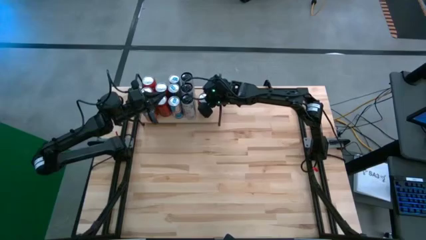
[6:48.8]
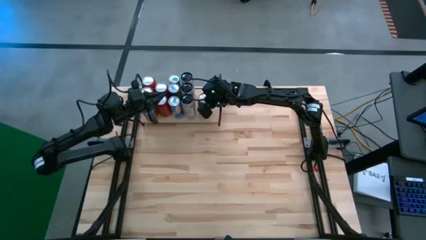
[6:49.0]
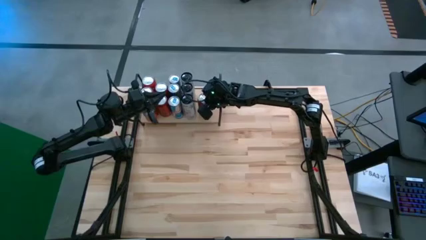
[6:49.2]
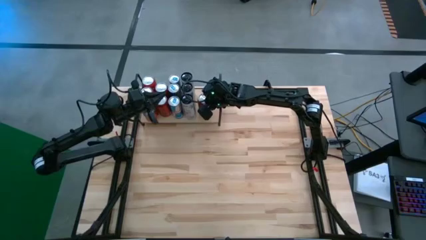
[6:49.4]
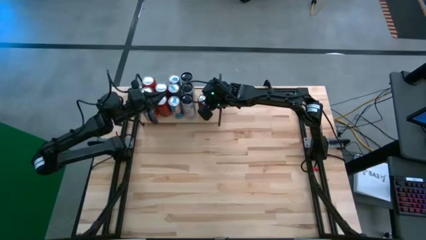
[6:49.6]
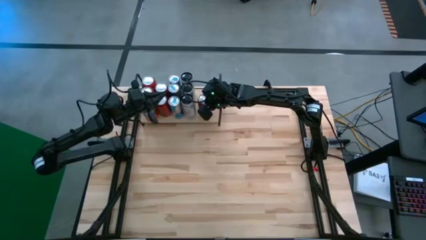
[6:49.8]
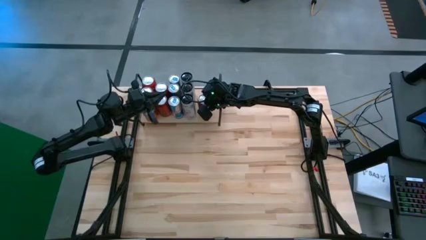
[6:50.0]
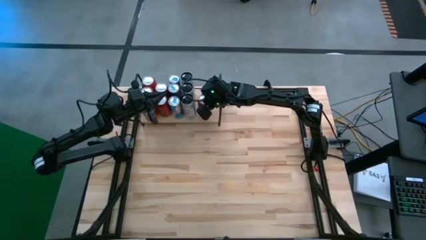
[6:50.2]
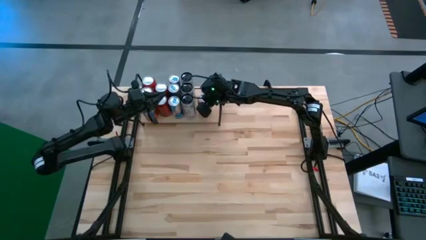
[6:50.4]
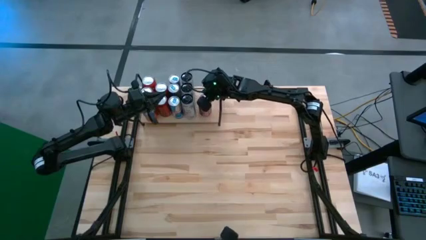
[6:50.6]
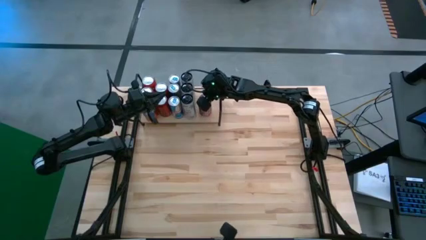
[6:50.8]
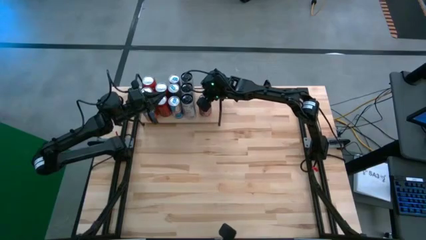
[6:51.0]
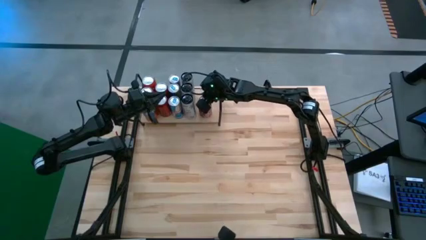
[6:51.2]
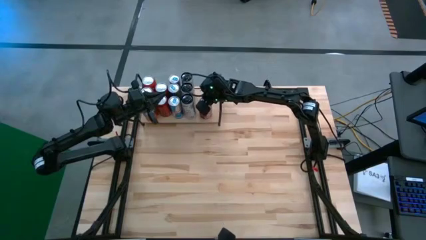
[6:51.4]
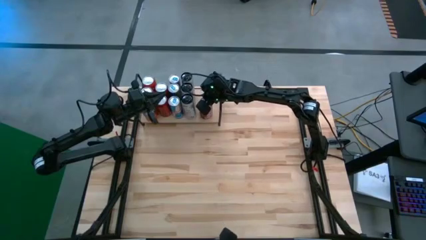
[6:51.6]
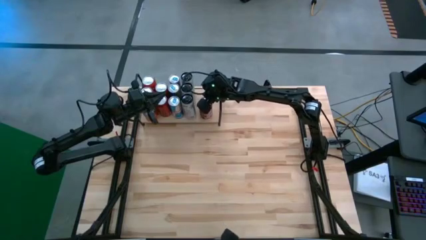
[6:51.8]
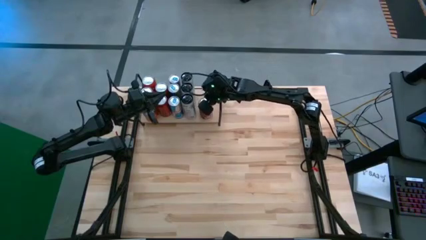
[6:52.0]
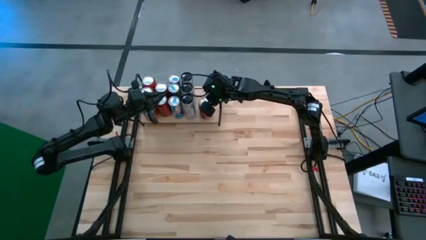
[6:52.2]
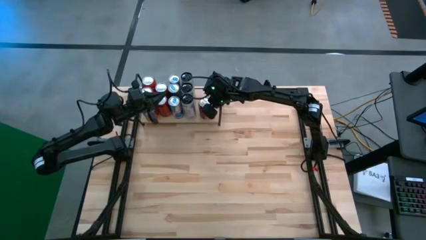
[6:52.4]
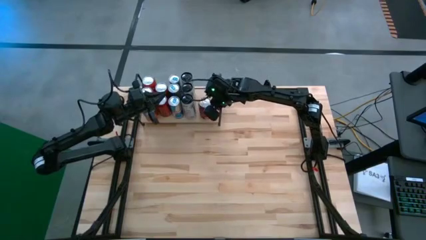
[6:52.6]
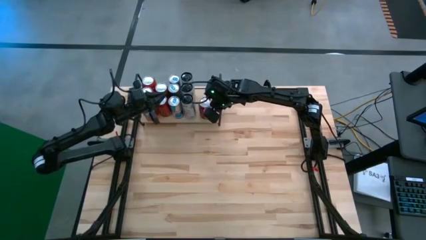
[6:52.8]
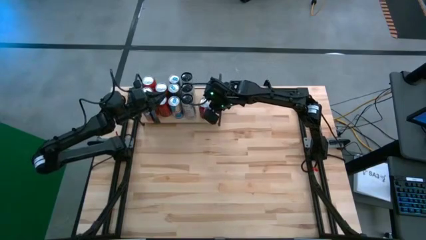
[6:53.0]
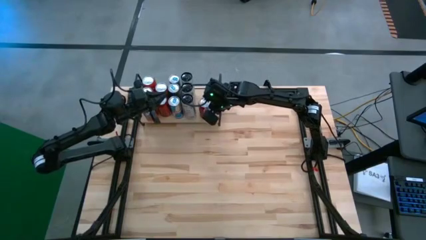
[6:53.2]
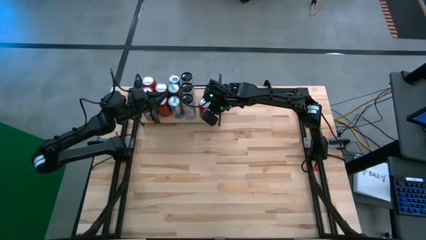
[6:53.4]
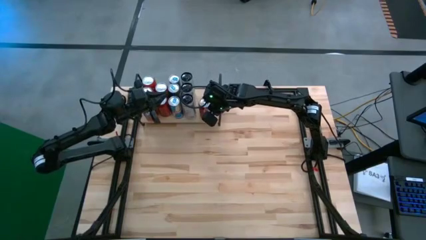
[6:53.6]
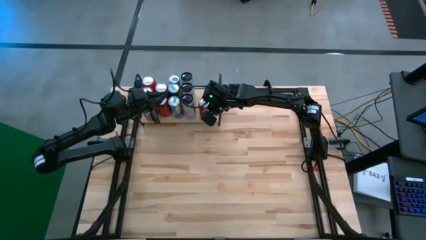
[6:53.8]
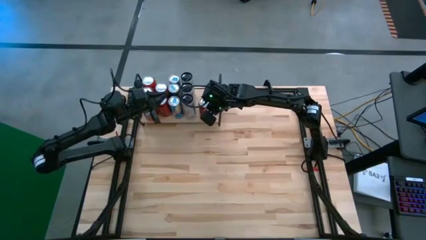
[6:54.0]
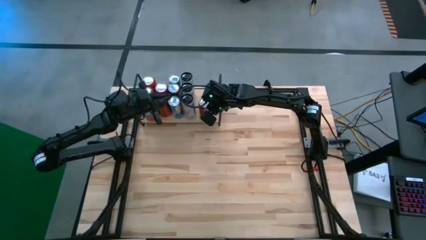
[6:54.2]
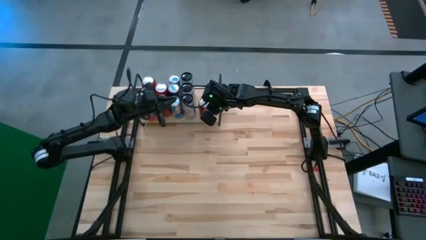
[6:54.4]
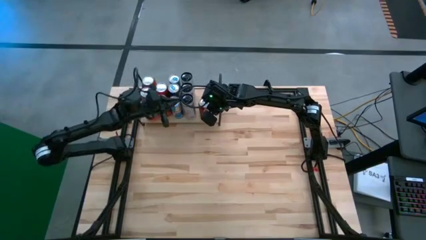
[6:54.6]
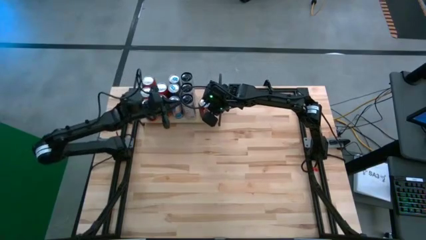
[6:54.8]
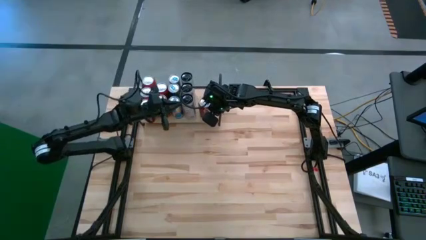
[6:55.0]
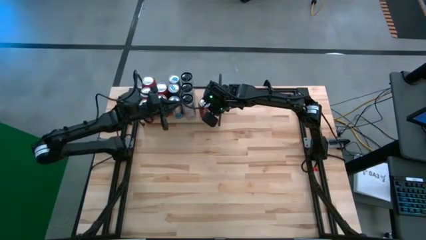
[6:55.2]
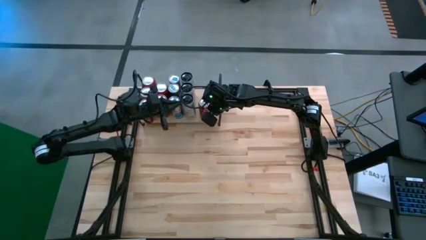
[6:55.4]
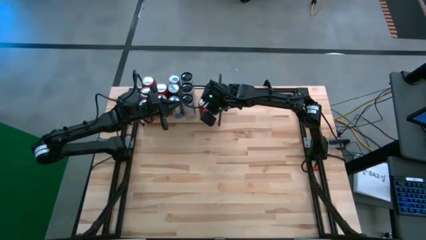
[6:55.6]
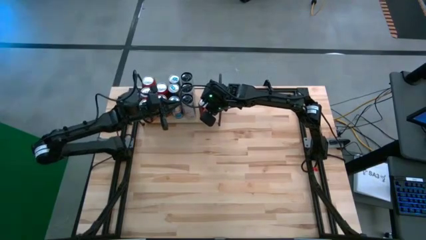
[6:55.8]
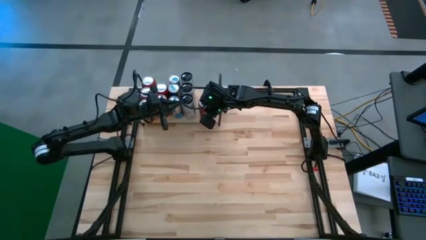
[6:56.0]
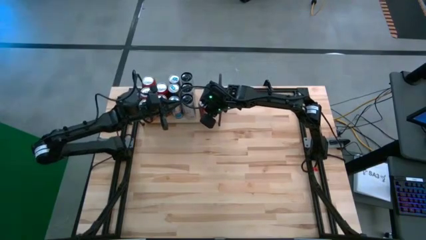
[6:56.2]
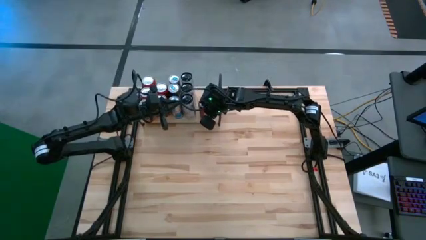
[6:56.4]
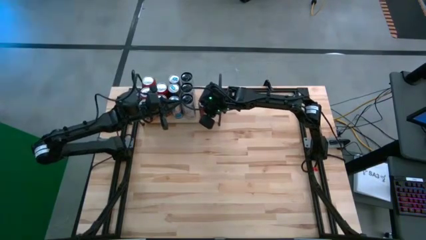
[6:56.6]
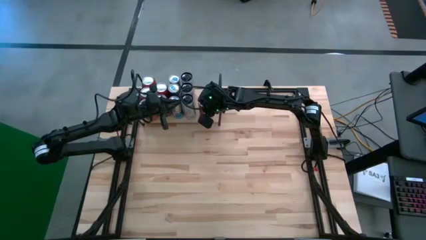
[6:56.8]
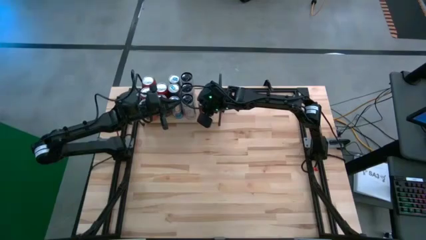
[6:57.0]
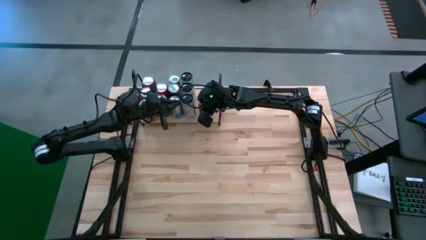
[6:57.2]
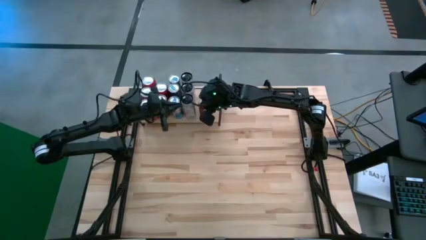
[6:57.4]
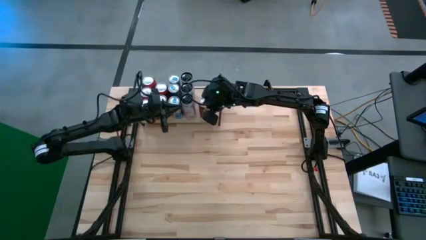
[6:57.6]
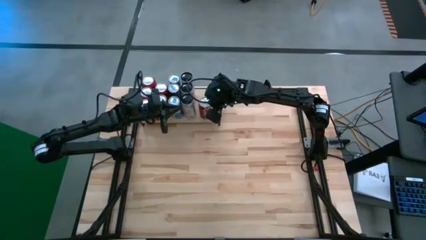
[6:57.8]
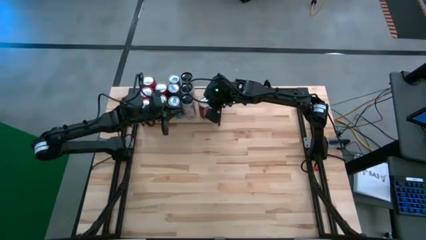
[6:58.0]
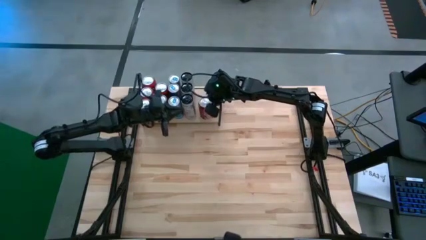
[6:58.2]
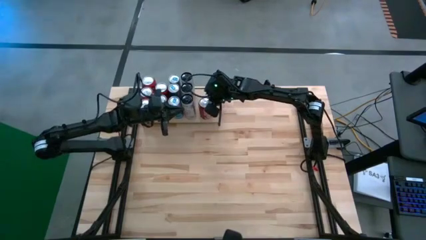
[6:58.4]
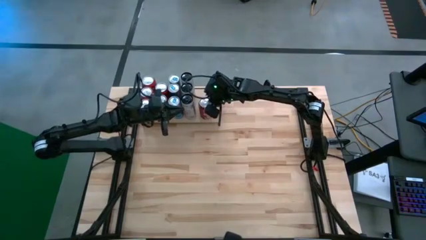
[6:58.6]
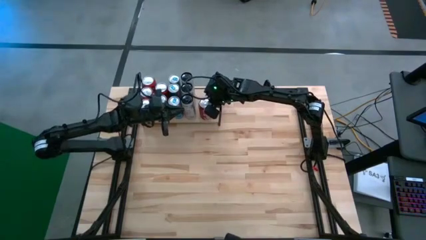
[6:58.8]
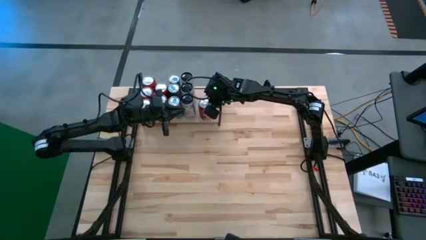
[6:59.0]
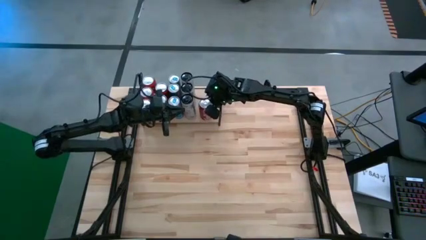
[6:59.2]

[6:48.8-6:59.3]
Task: Place canned beverage on shelf
Adjust the red white soda can on the shelf

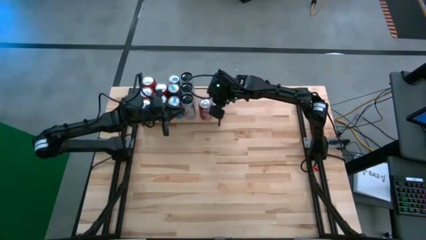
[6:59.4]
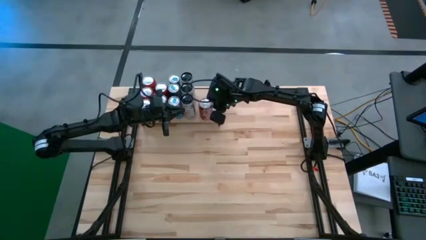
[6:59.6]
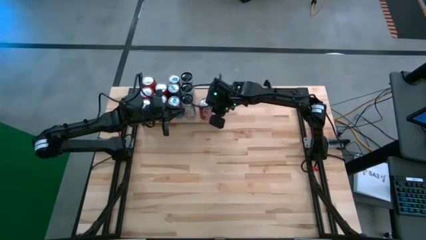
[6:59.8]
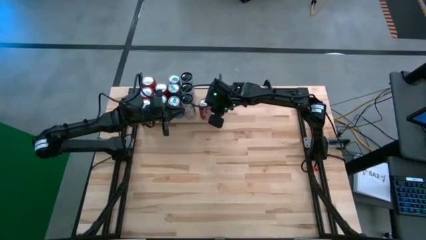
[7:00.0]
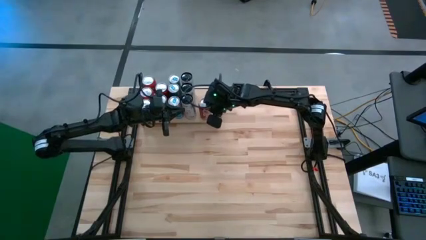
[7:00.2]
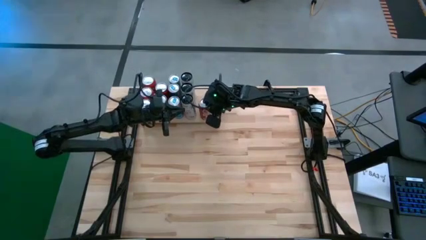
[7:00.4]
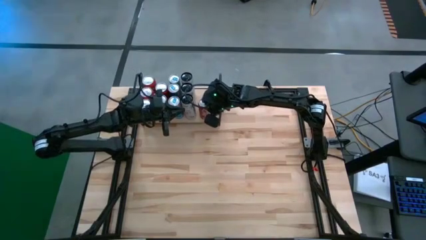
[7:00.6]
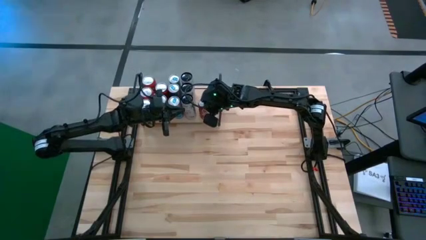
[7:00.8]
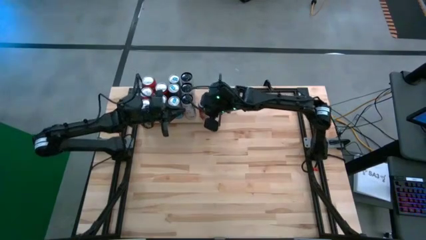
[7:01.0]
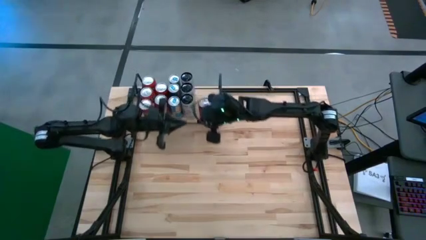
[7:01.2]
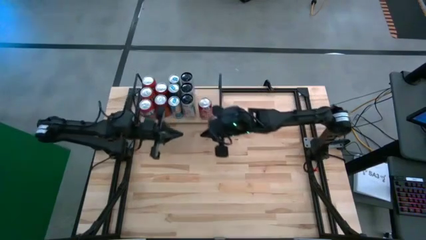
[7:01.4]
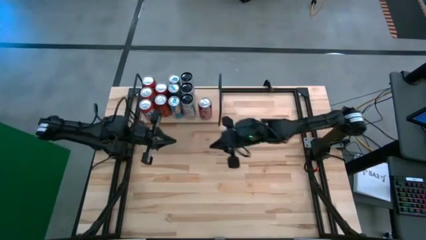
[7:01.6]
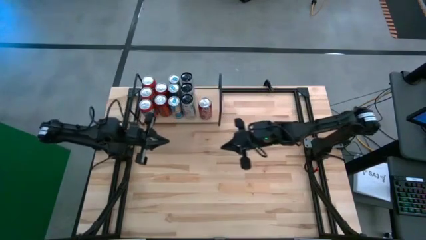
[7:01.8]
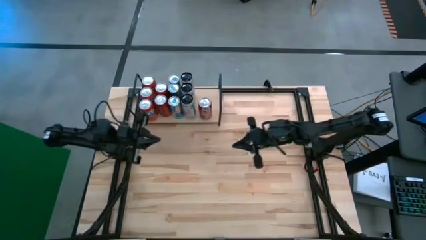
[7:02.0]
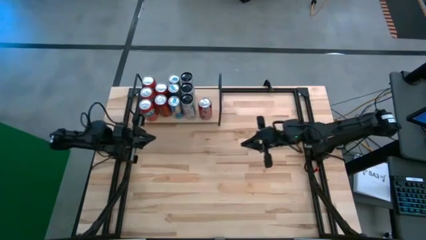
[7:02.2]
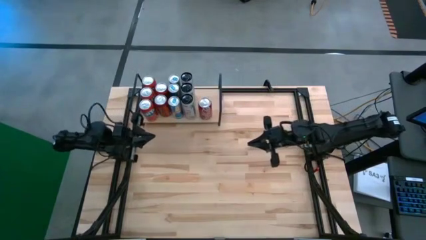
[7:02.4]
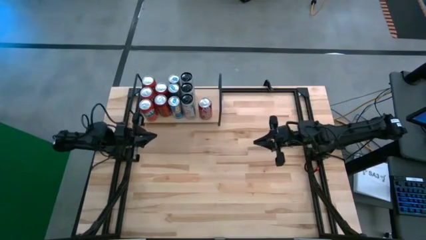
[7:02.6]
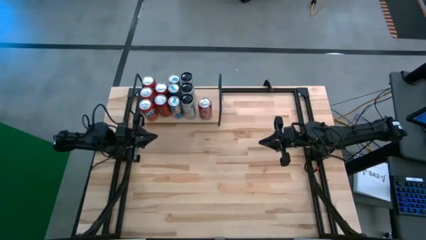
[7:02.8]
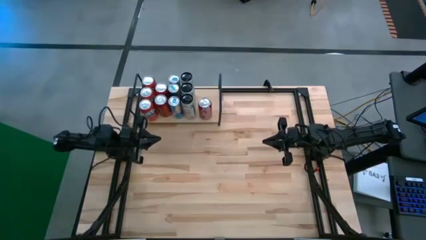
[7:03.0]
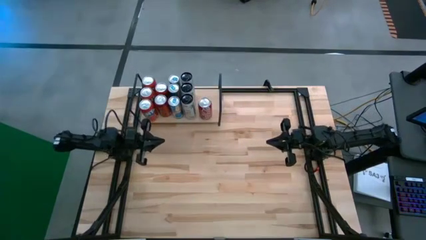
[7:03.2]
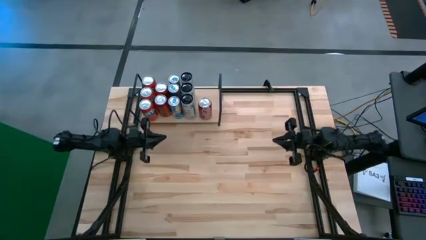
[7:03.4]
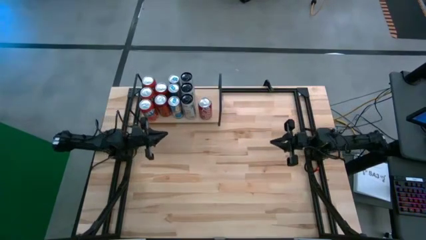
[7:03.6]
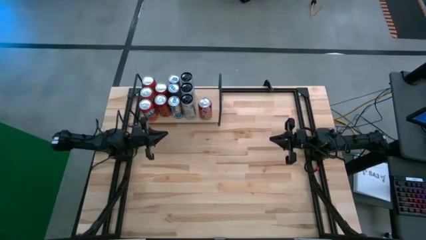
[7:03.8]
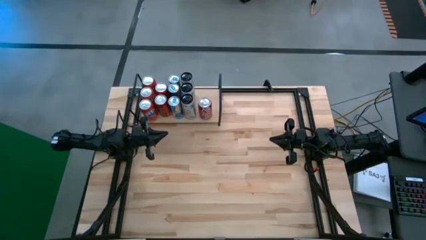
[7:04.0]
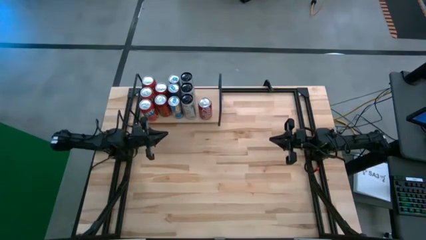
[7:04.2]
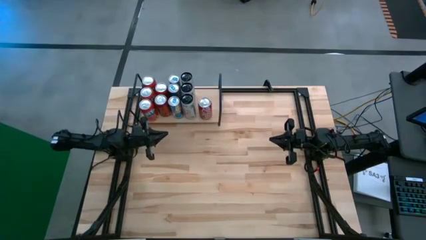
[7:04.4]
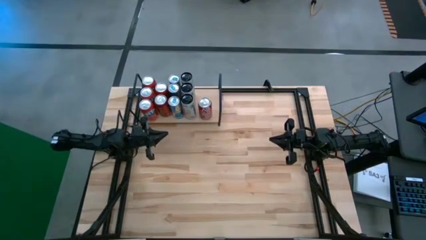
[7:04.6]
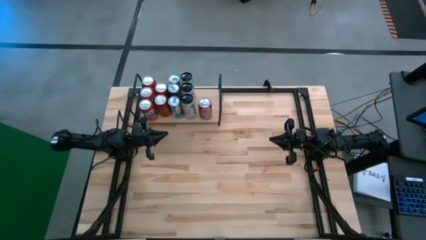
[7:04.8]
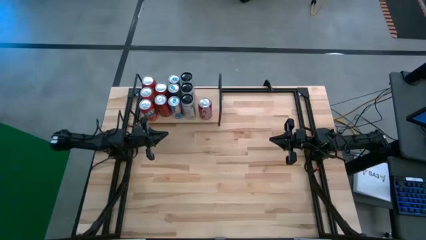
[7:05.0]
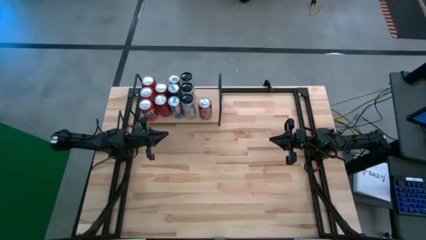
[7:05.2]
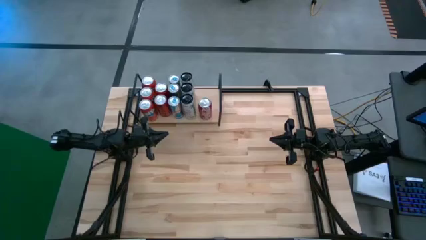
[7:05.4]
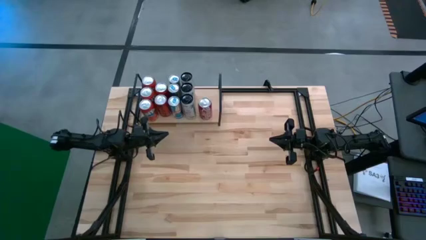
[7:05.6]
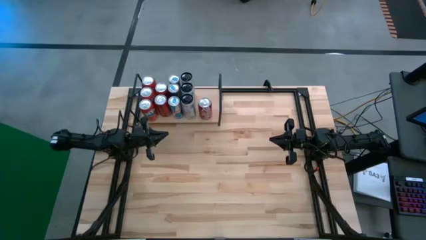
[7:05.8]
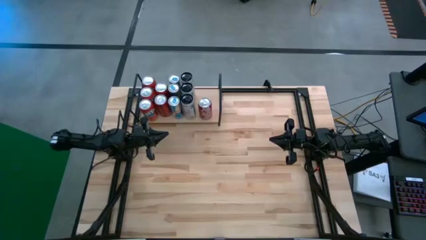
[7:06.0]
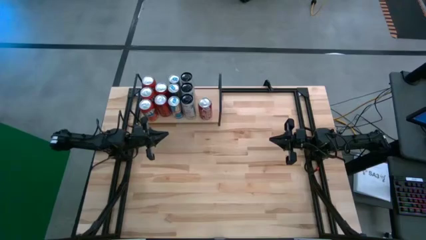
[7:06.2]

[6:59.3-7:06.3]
Return to Home Position
